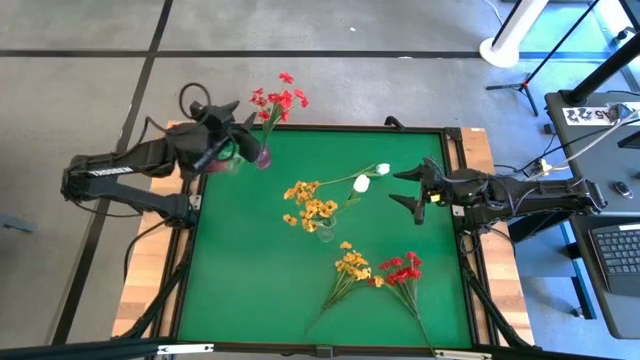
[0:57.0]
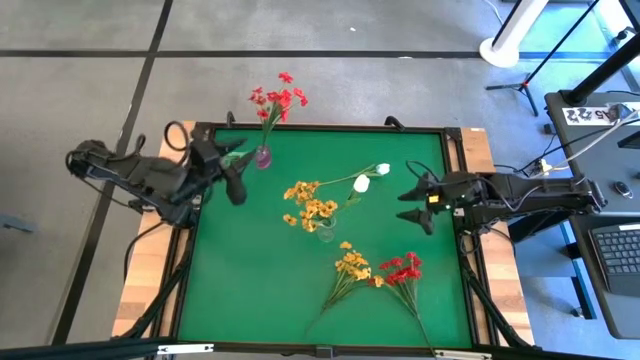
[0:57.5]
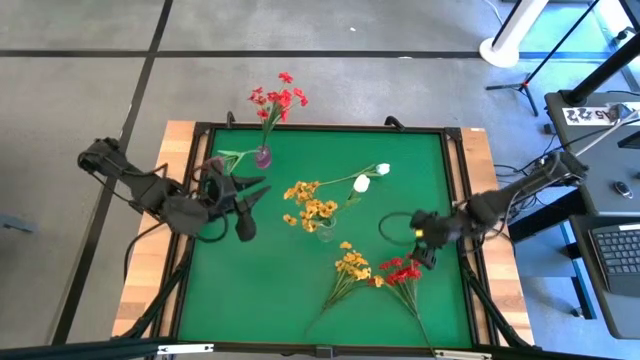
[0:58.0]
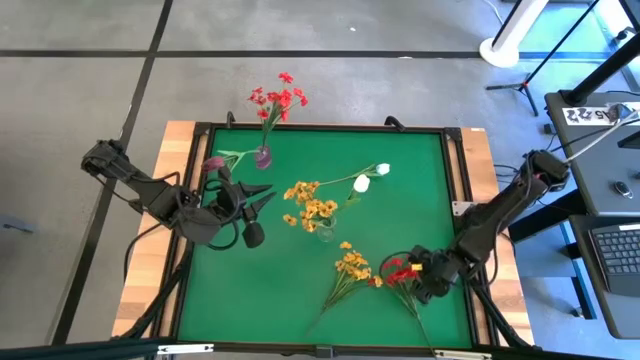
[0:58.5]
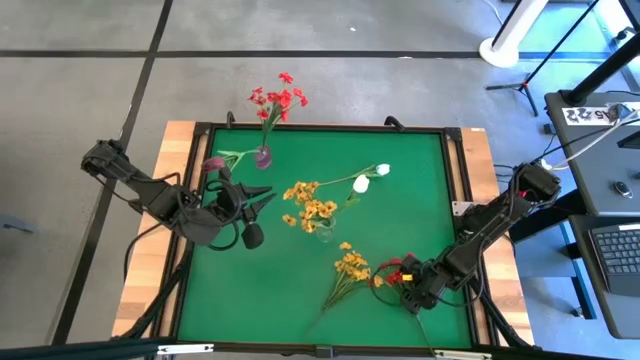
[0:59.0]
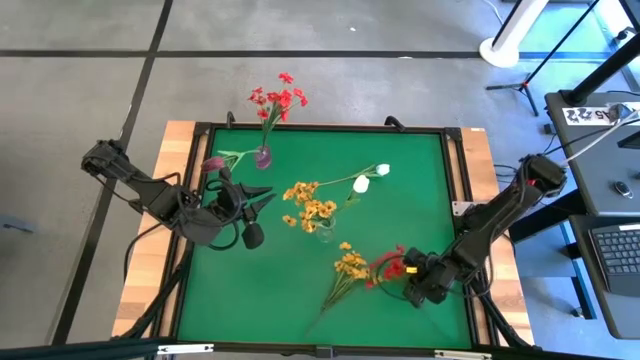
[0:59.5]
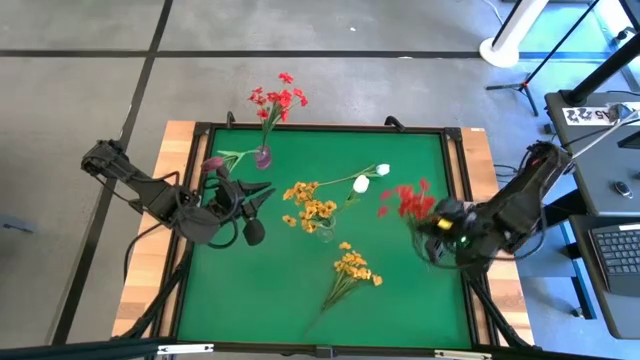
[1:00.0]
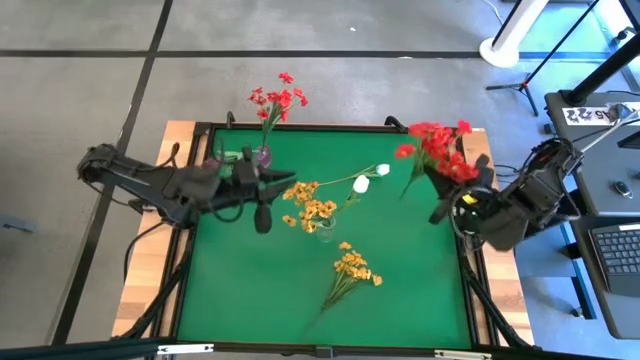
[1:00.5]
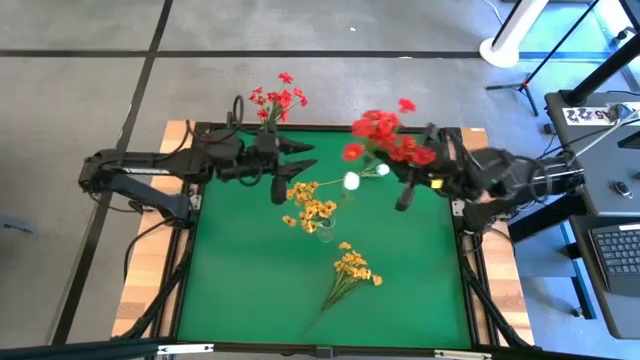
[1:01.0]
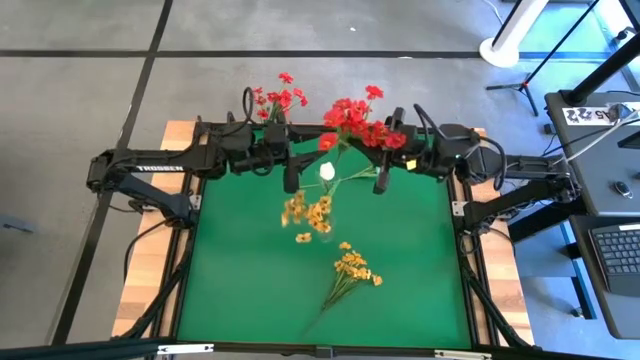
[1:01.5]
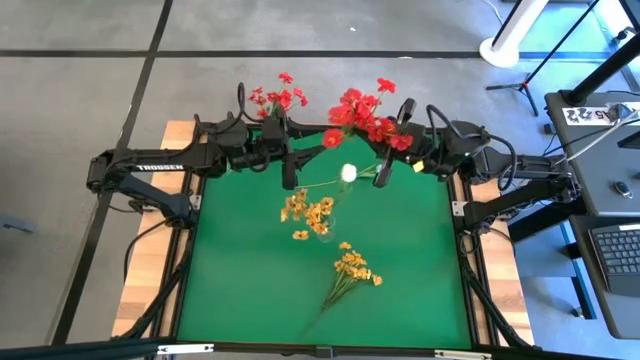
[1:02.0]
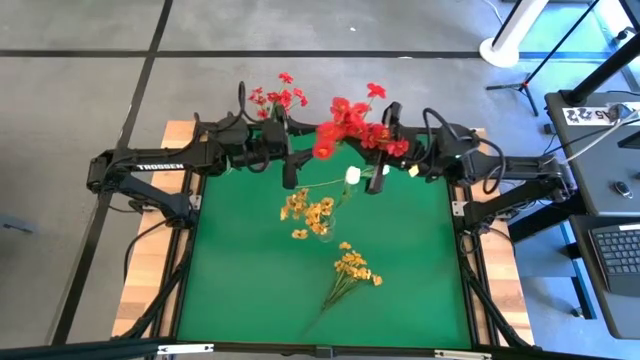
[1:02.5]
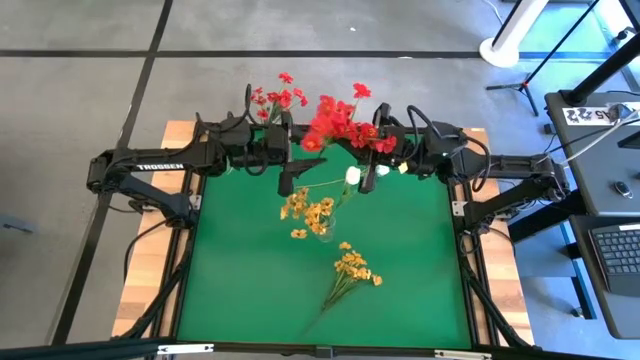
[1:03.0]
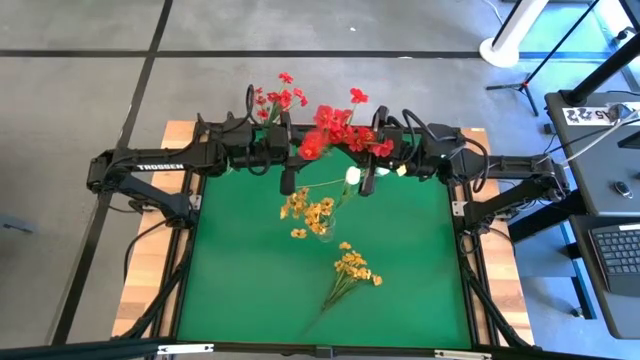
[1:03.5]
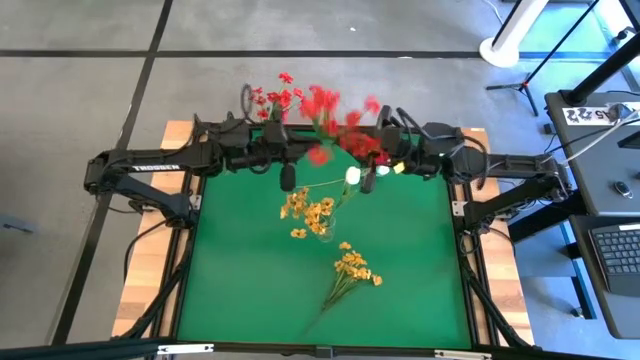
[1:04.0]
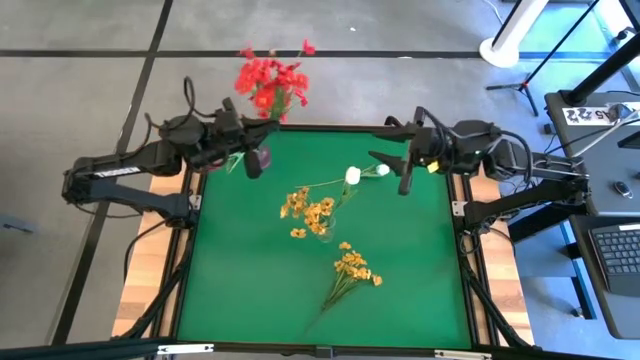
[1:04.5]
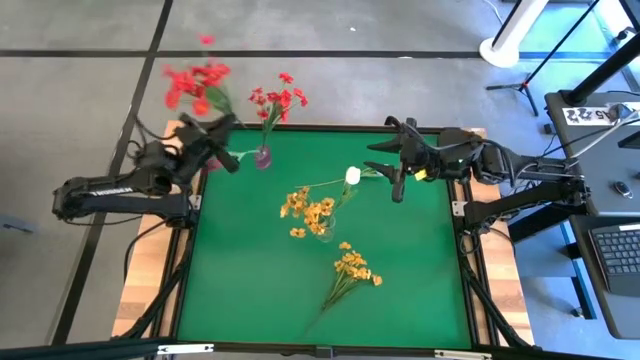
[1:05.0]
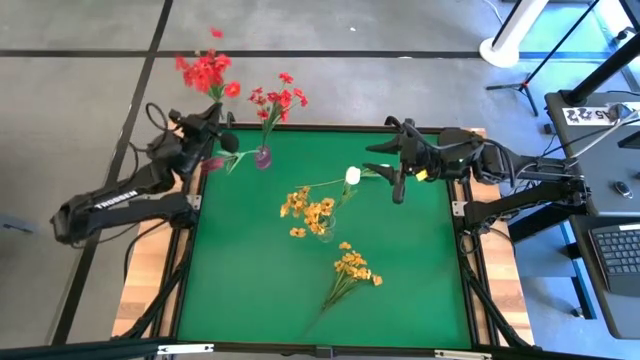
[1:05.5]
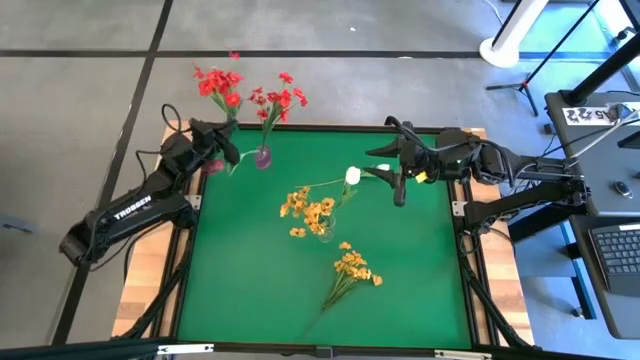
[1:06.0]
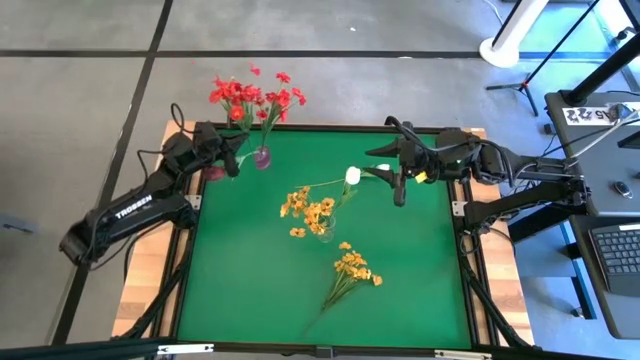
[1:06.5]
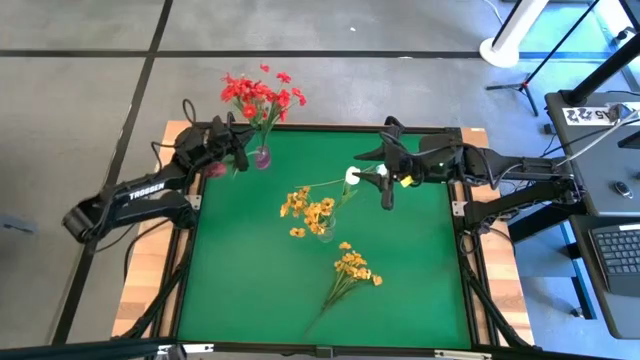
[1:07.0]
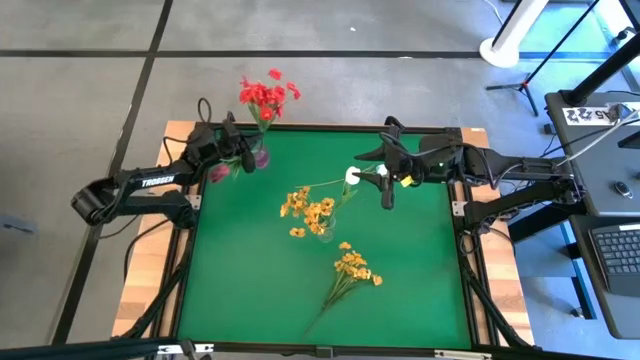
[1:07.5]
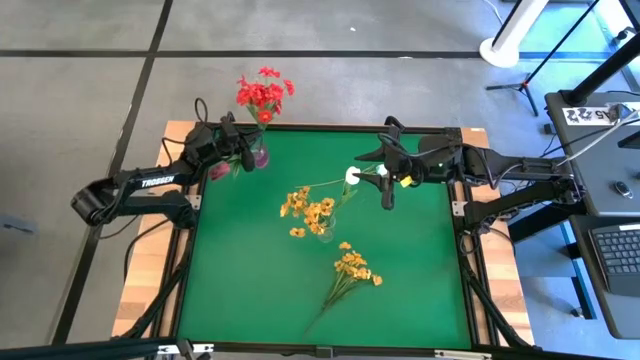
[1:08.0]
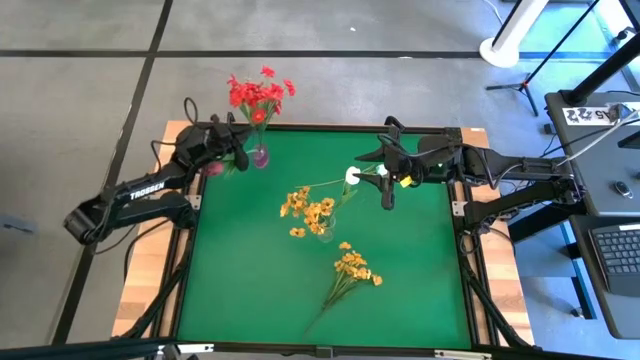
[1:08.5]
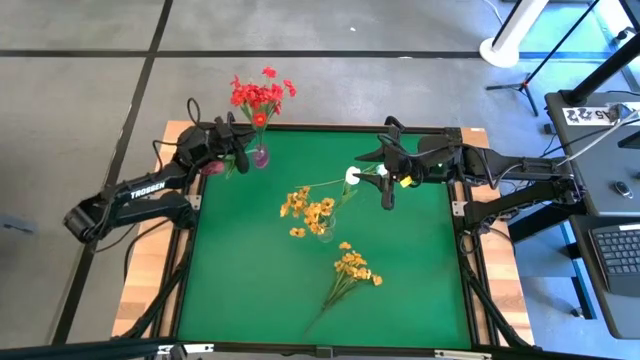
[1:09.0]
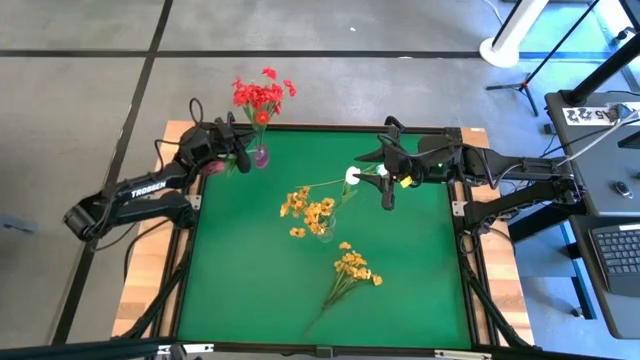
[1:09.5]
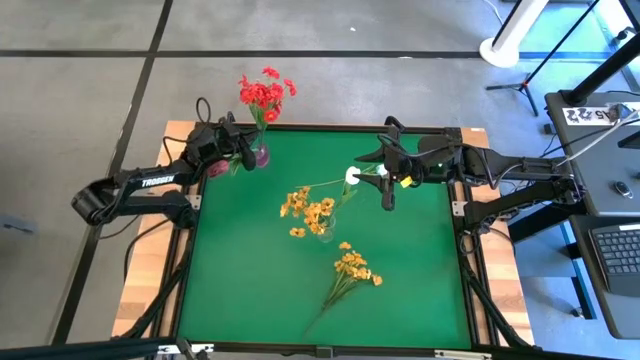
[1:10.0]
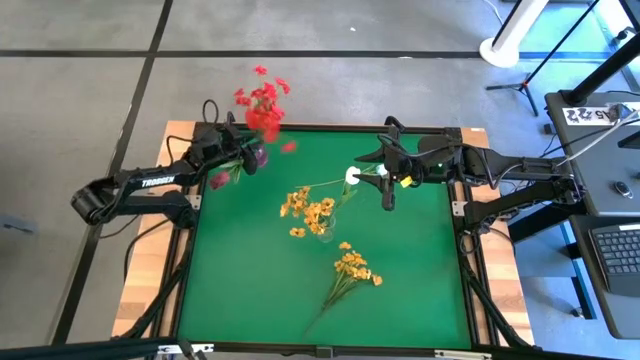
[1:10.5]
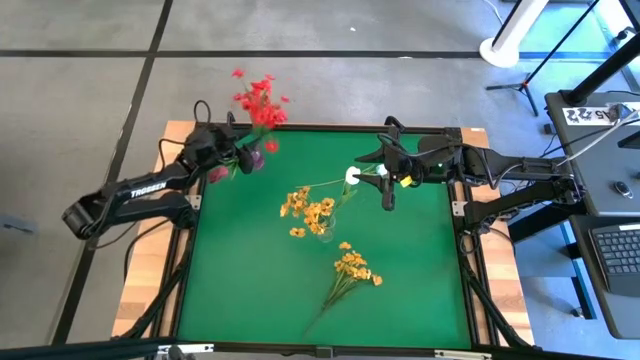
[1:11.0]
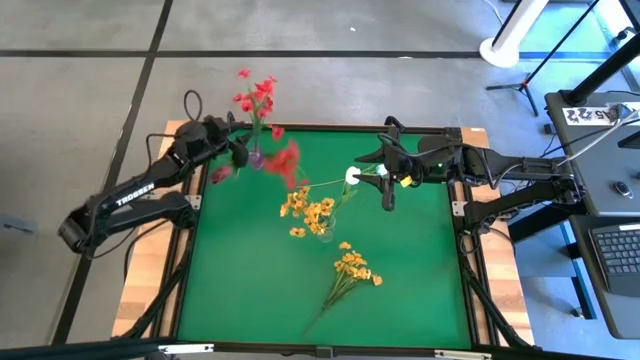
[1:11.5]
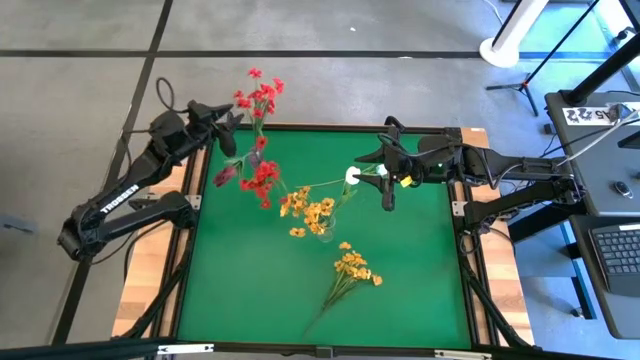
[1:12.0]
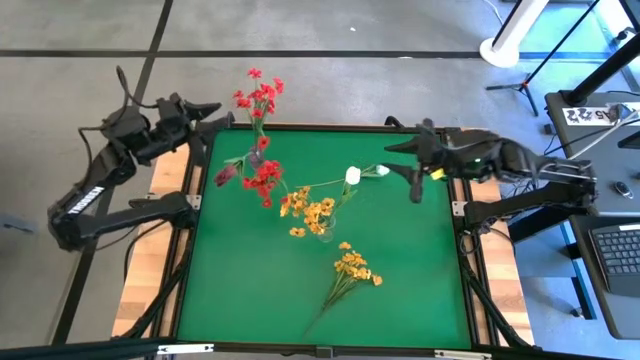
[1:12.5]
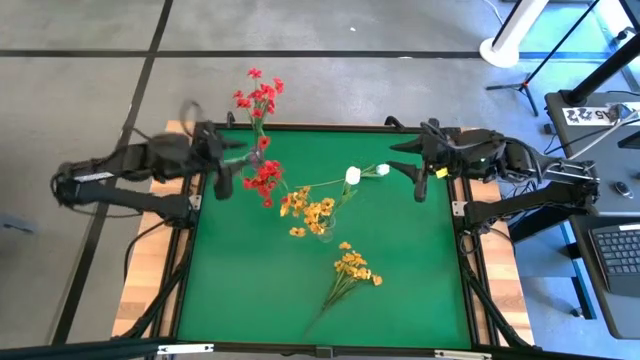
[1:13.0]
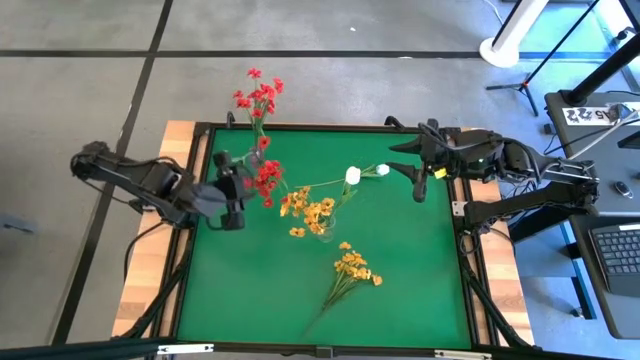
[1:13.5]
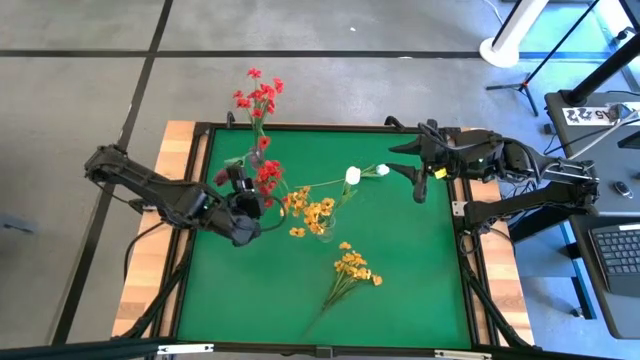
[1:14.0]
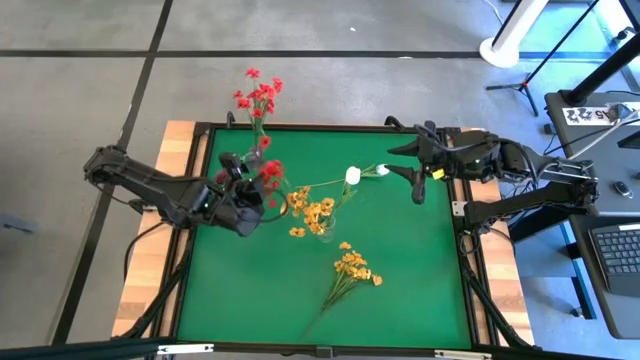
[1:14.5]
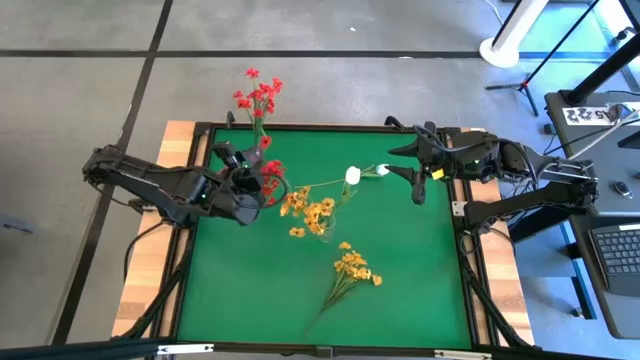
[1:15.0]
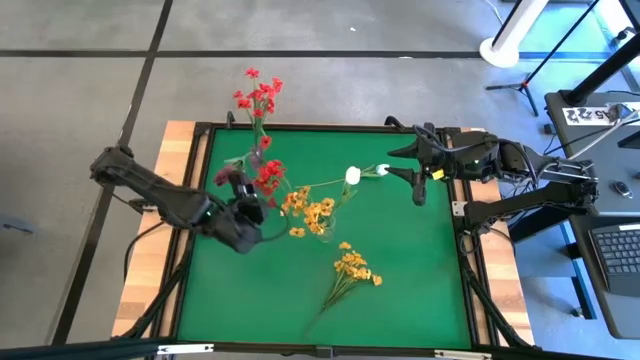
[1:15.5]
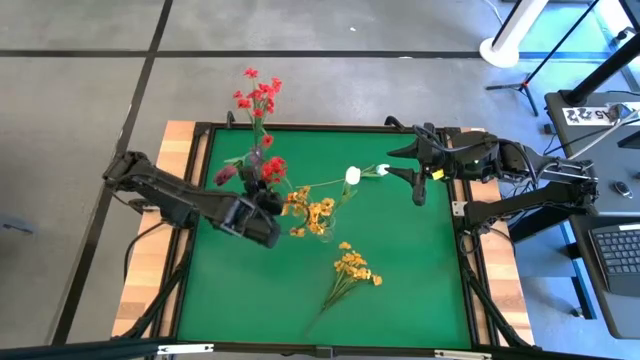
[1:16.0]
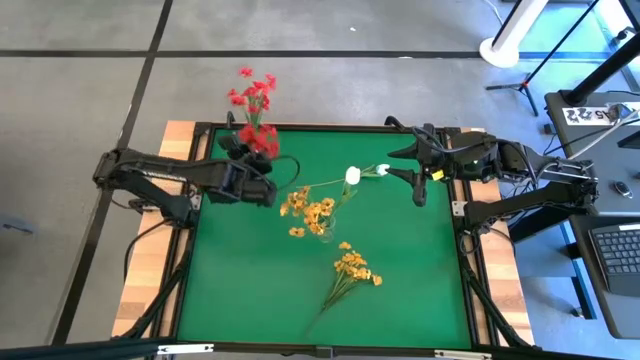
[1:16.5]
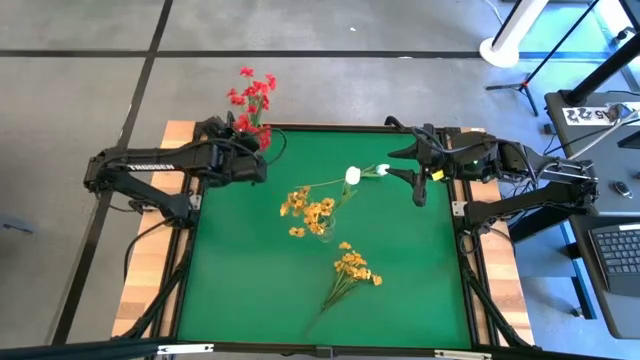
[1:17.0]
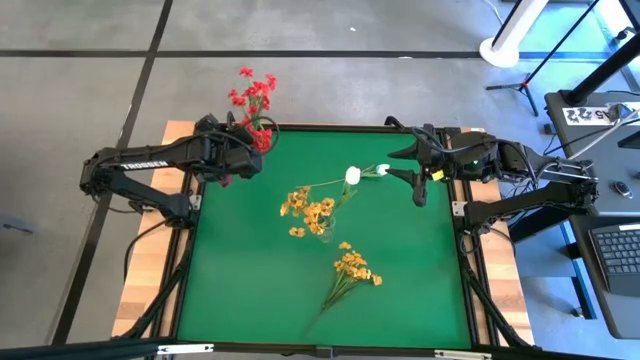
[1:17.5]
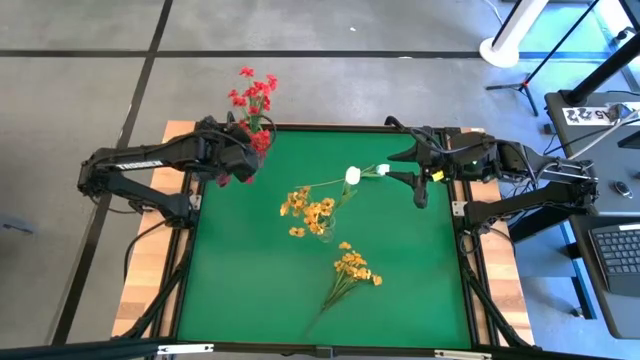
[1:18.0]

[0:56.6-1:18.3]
Task: Sort flowers into vase by color
Put the red flower into the violet vase
